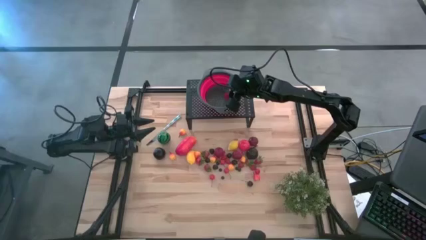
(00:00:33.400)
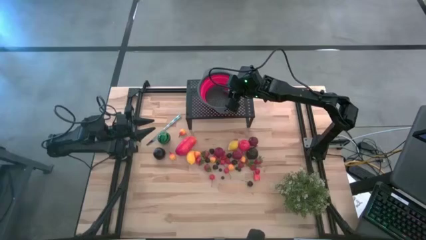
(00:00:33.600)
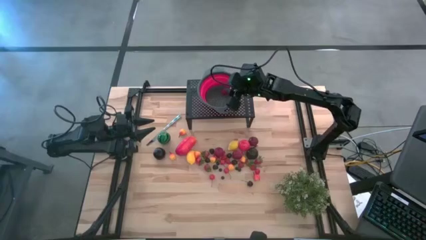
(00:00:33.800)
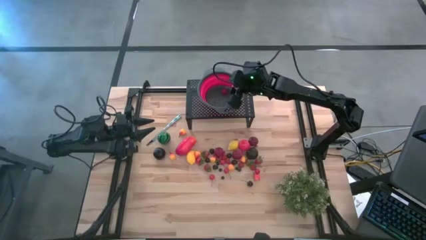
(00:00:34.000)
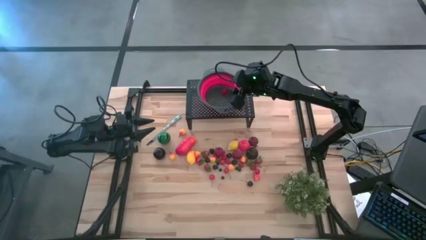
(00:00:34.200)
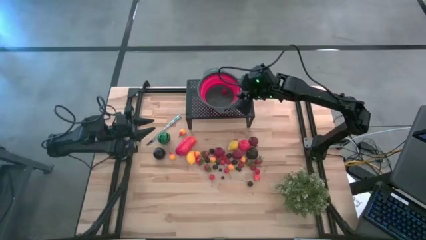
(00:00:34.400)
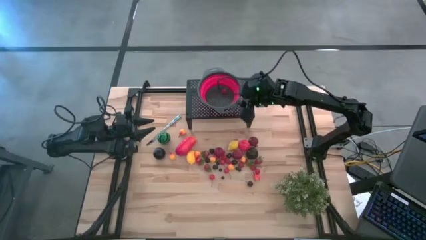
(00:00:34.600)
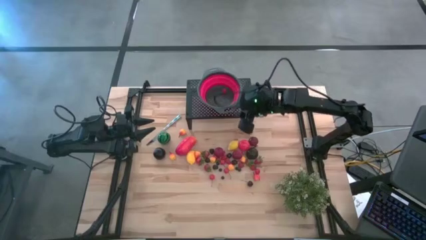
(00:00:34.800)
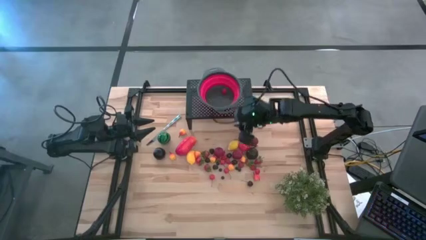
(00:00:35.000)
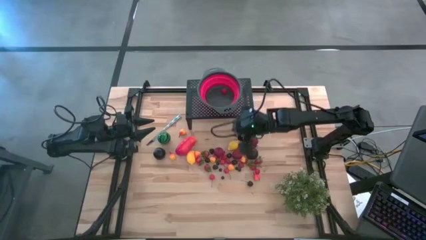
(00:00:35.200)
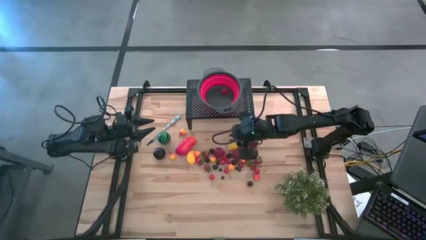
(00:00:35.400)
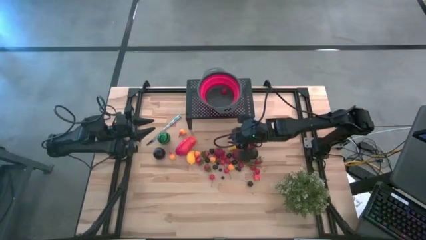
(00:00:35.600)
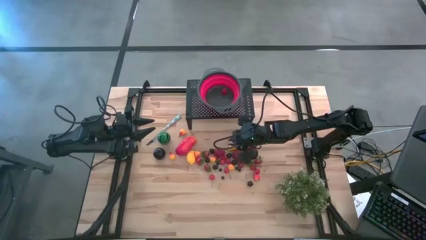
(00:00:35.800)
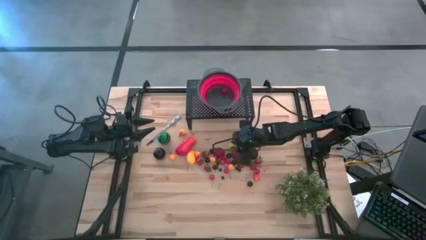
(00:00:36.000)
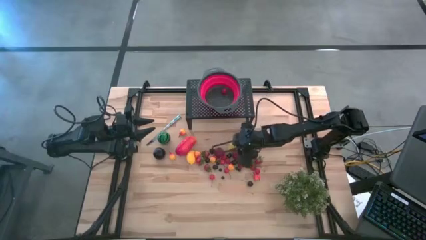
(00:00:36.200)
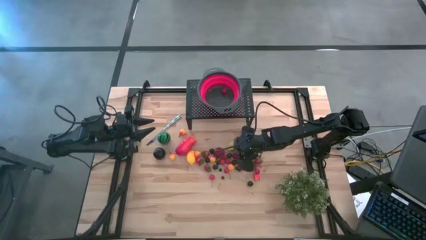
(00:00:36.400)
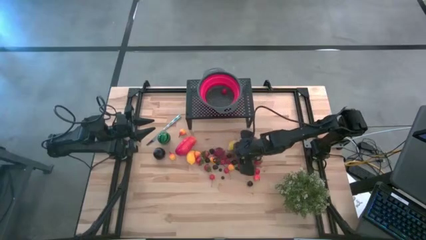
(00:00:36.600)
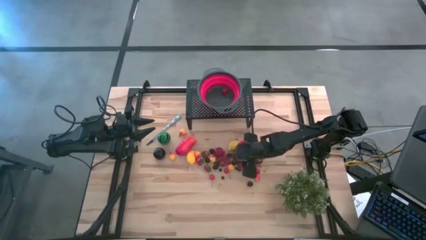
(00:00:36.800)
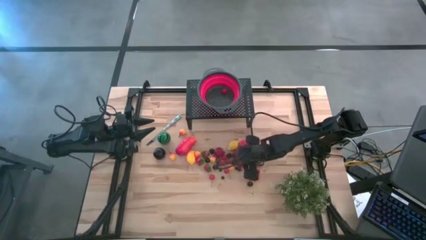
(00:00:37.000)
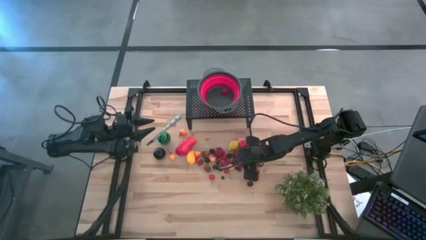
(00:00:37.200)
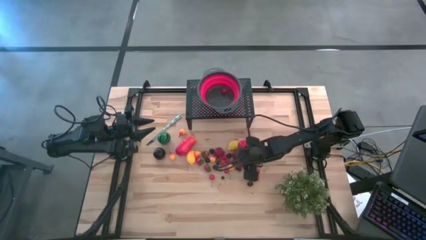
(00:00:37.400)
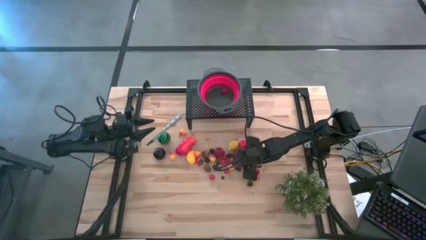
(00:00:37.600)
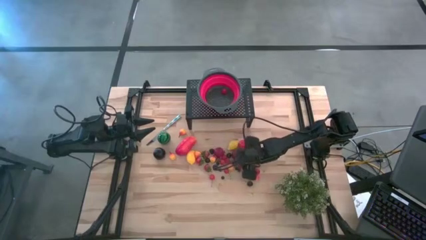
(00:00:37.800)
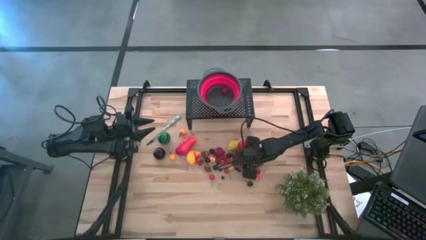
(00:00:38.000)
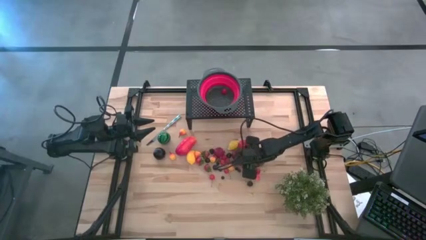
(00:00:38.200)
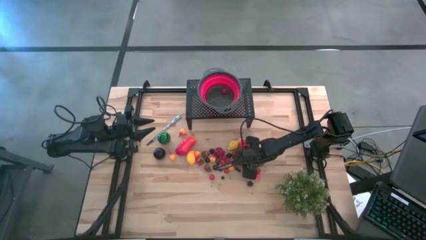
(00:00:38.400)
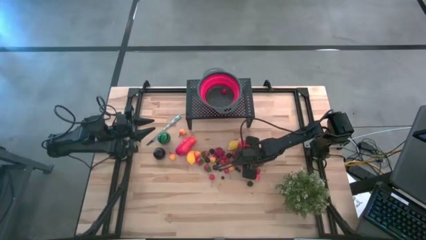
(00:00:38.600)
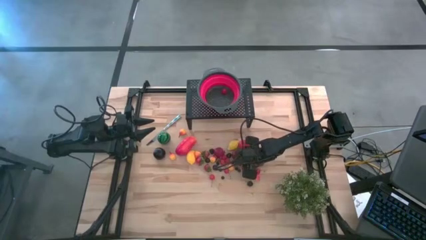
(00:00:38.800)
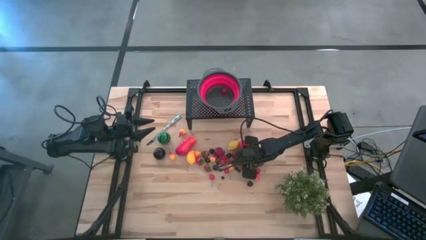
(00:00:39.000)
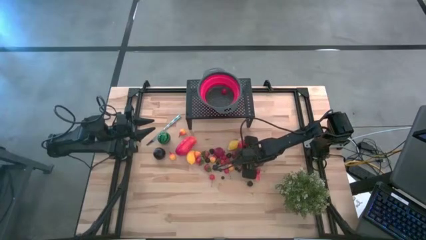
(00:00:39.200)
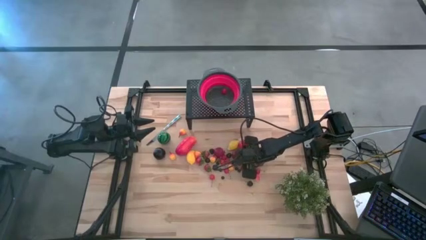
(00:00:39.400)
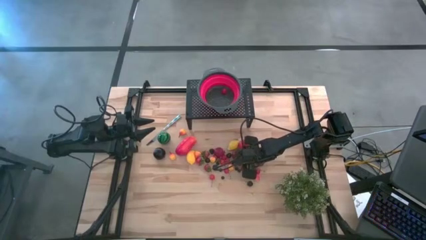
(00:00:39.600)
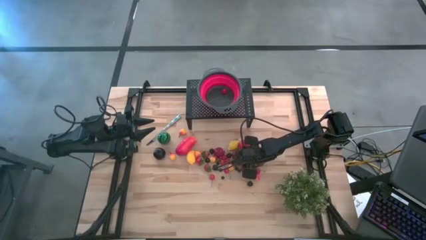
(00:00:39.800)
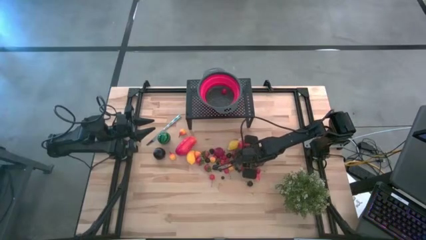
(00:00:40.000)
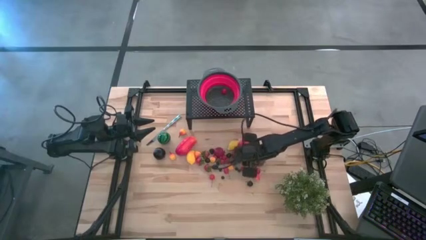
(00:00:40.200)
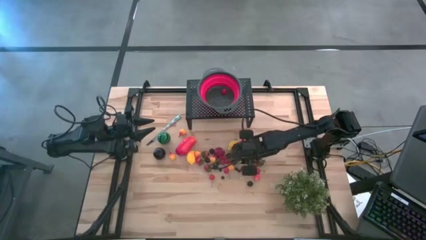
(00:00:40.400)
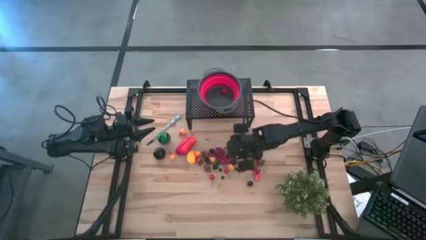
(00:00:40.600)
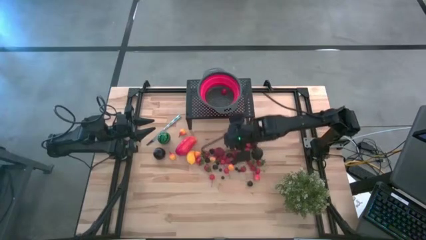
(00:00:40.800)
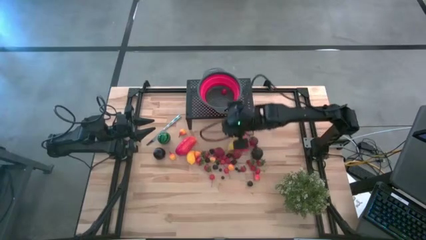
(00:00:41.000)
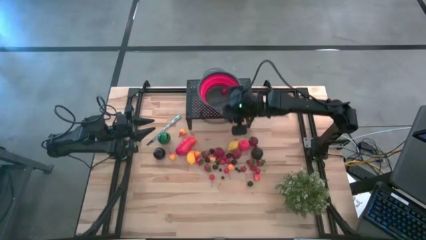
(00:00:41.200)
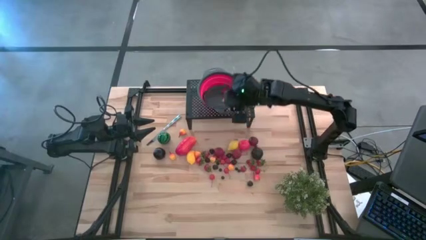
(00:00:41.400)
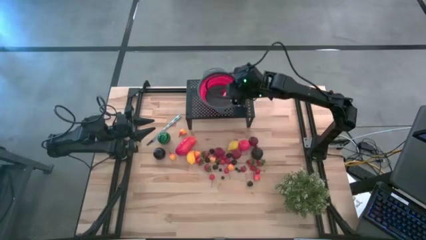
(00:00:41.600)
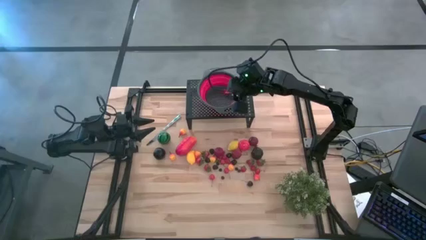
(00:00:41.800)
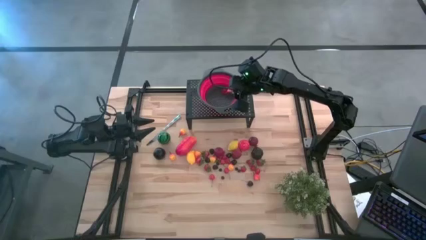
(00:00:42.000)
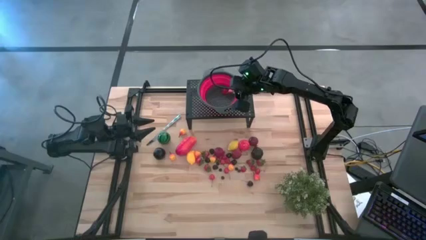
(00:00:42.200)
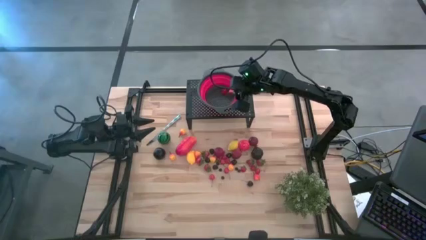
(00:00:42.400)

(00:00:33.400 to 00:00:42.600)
Task: Pick & Place Fruit
Put the peach in the red colander on the shelf

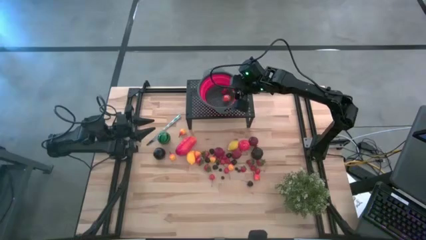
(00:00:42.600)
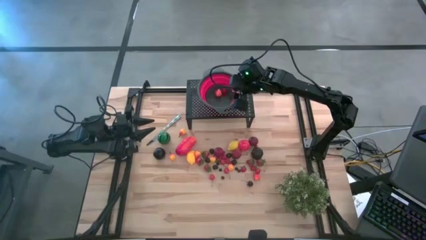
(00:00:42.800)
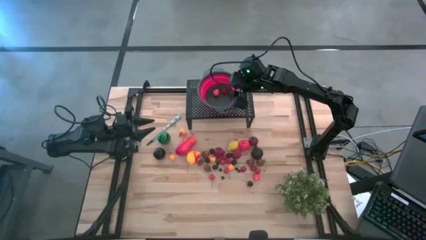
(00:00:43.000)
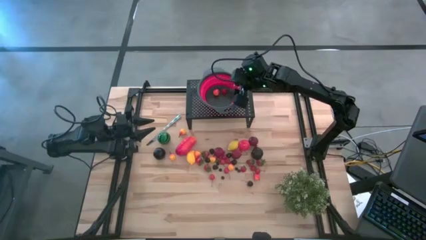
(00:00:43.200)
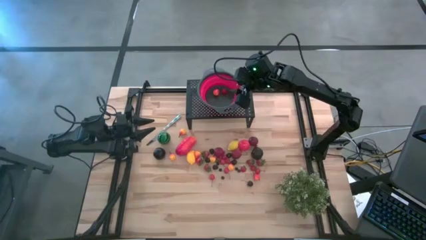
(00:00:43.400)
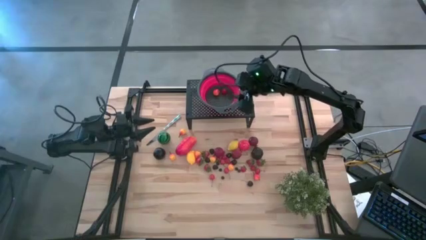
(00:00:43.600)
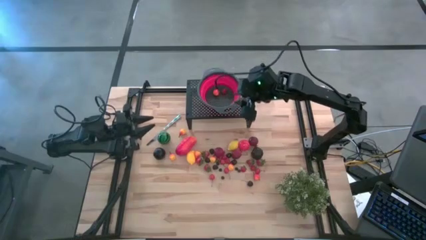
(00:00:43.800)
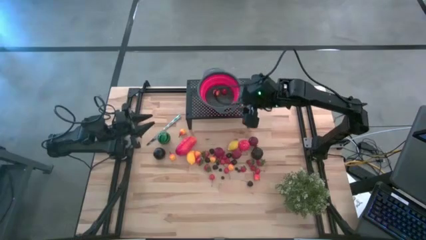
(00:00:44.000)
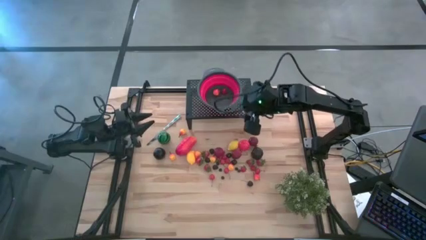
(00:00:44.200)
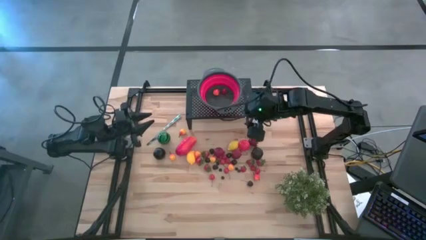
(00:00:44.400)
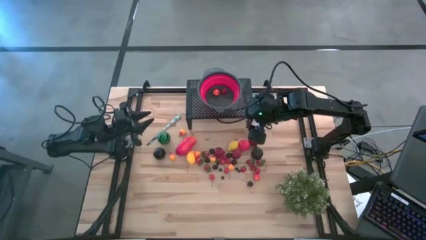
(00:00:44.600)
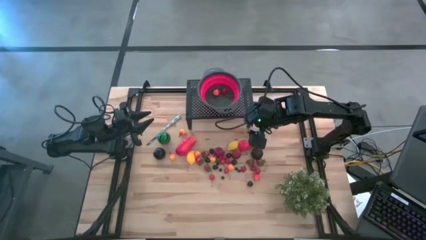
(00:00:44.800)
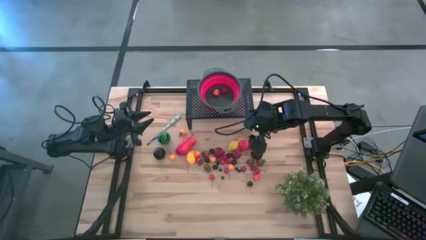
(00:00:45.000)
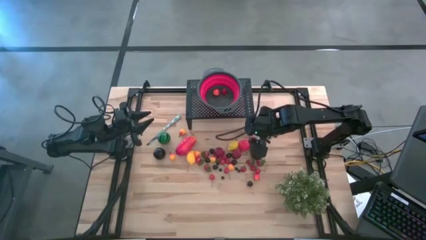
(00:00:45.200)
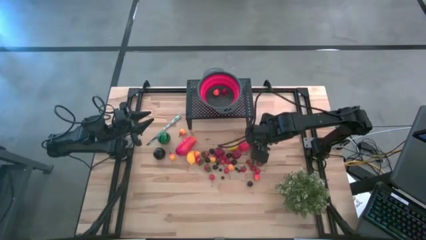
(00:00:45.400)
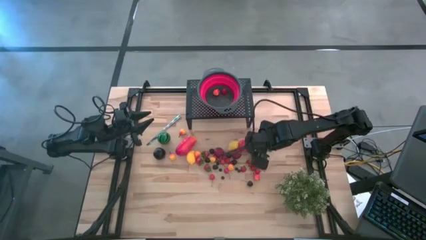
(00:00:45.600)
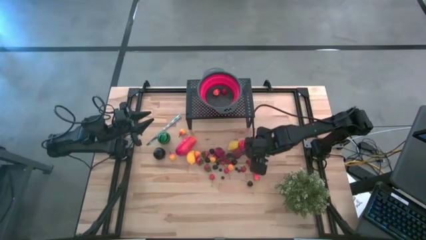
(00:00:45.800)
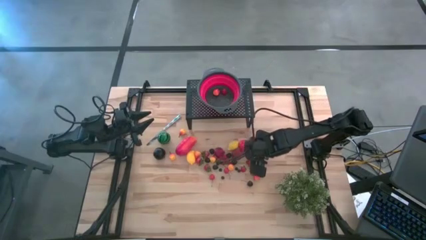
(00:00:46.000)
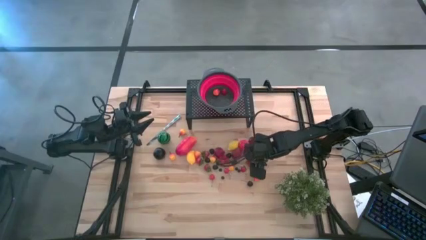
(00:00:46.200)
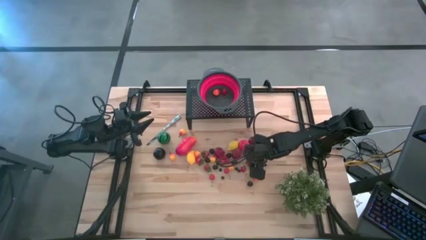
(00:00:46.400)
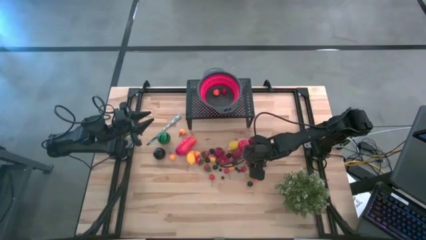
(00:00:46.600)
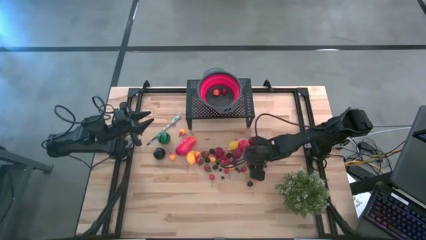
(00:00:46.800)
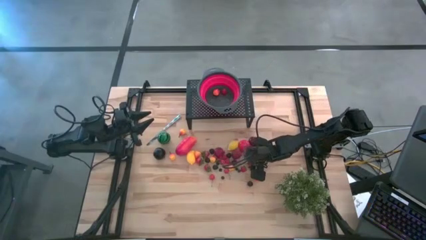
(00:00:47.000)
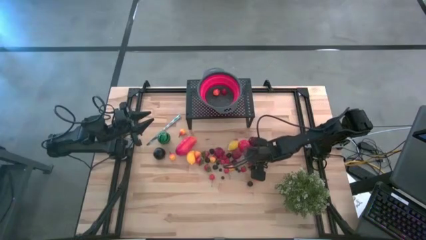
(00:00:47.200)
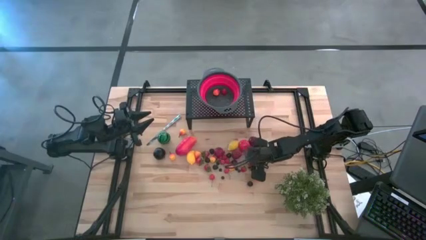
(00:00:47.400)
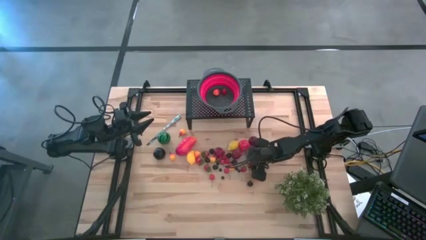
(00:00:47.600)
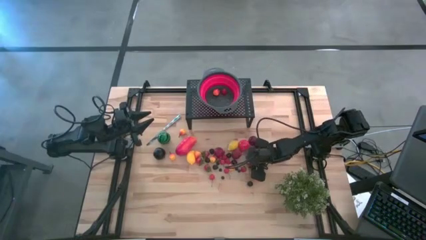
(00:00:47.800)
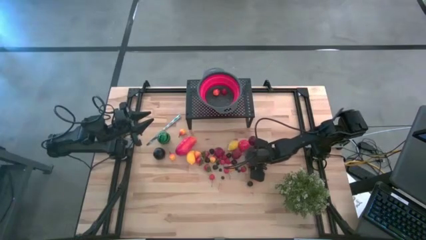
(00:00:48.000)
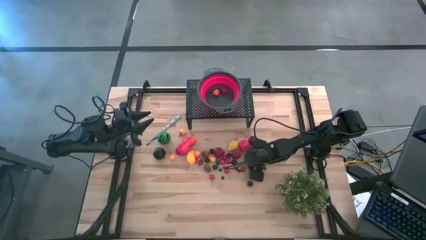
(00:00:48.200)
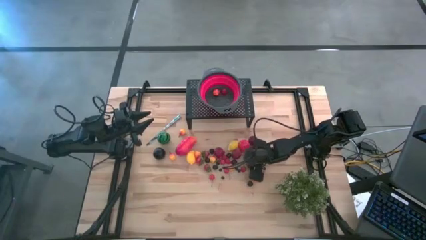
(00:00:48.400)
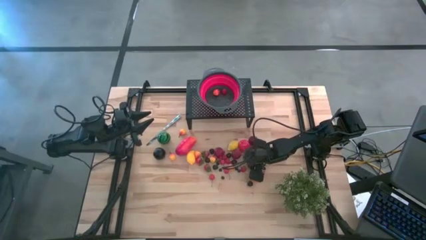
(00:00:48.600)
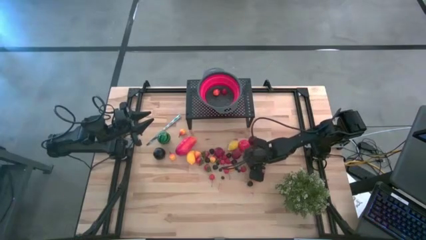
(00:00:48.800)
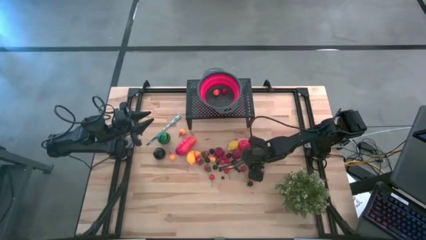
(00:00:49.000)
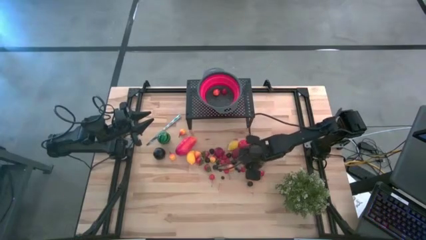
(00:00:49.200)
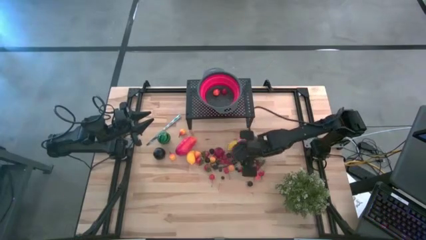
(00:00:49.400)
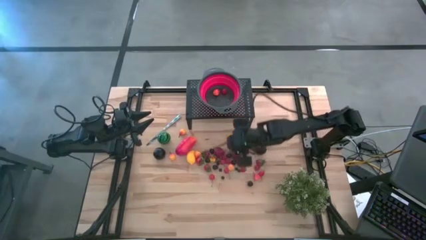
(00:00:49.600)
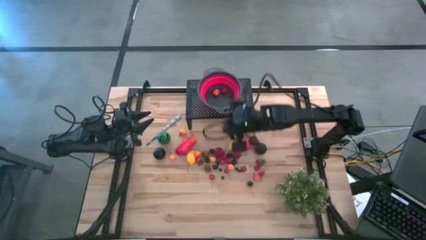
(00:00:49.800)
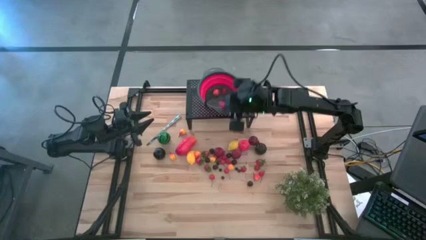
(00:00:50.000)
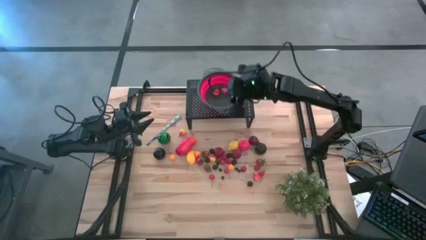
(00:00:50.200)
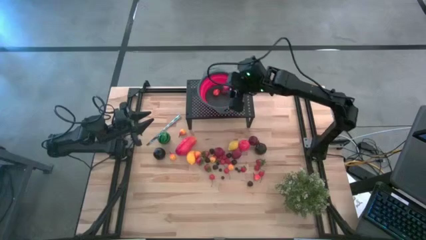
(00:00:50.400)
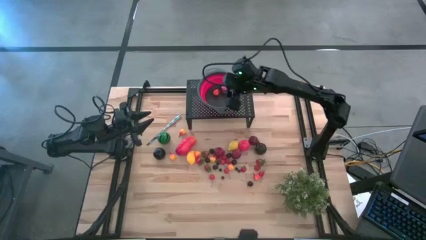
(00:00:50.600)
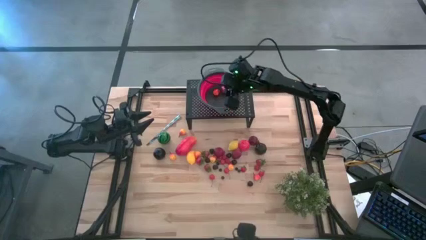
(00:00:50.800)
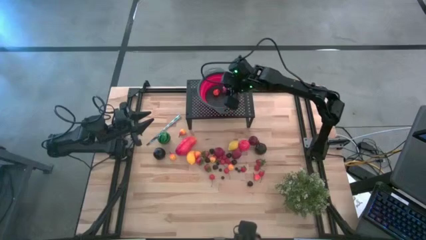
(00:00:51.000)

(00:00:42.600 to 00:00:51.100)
Put the strawberry in the red colander on the shelf
